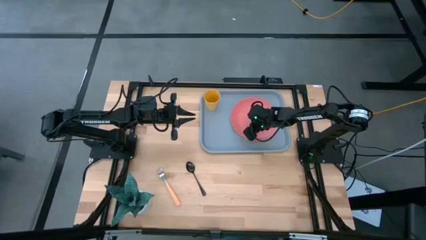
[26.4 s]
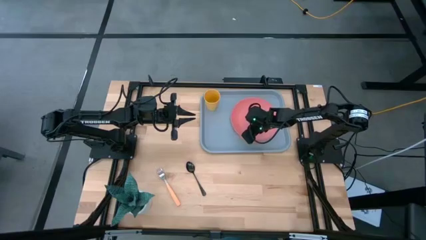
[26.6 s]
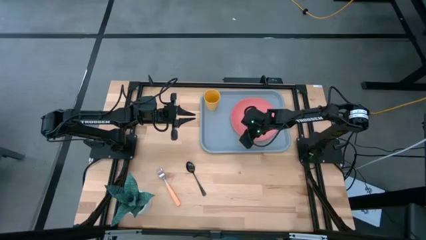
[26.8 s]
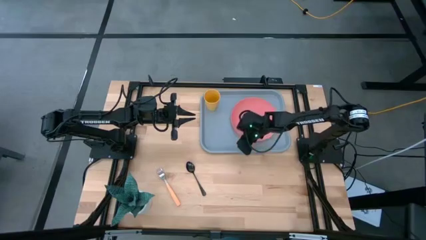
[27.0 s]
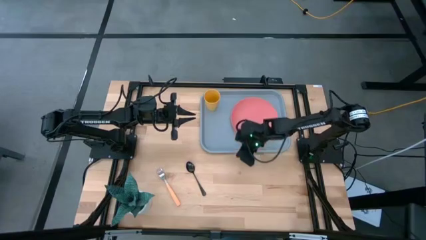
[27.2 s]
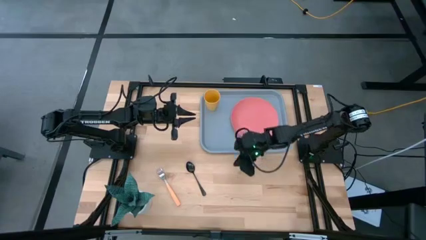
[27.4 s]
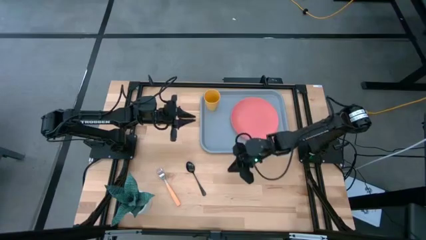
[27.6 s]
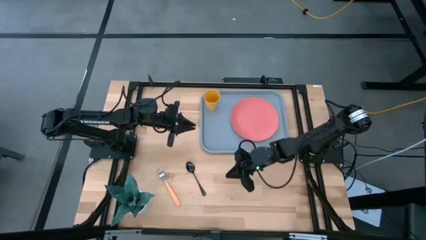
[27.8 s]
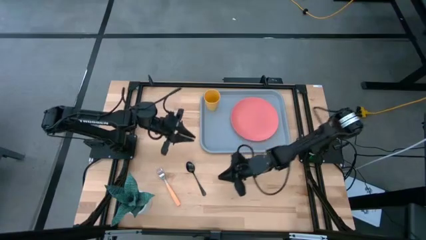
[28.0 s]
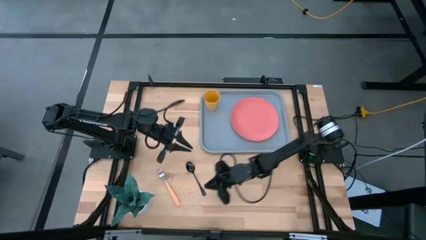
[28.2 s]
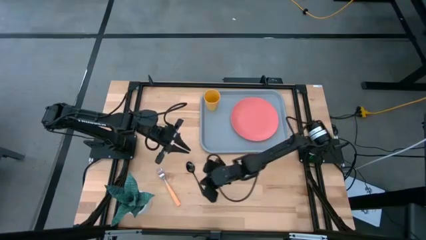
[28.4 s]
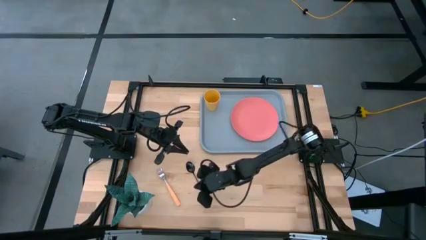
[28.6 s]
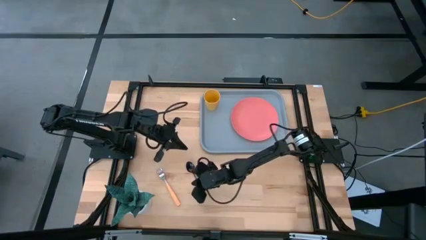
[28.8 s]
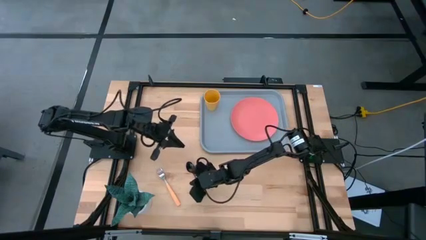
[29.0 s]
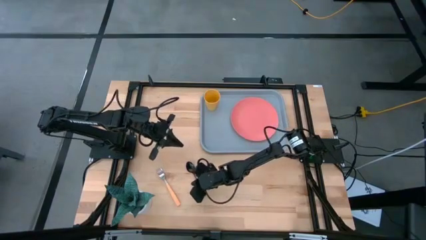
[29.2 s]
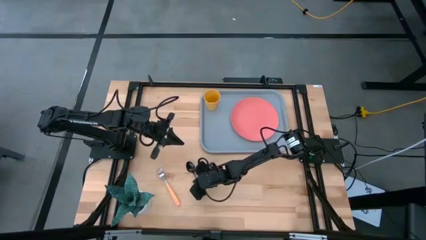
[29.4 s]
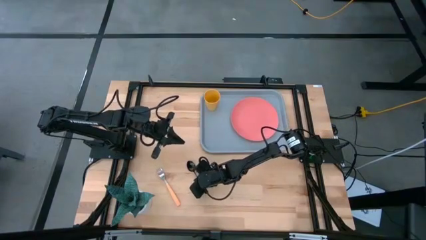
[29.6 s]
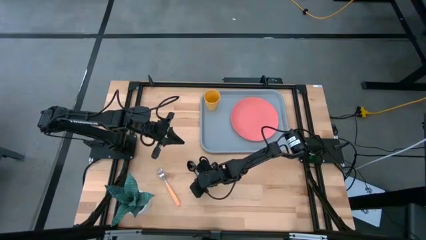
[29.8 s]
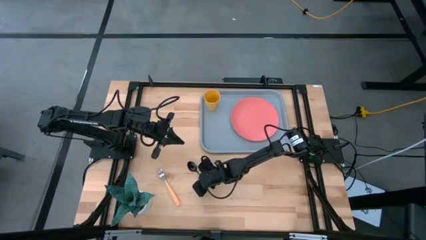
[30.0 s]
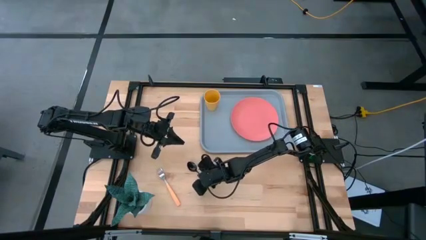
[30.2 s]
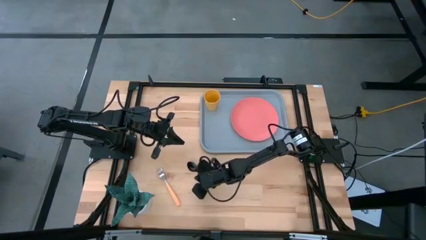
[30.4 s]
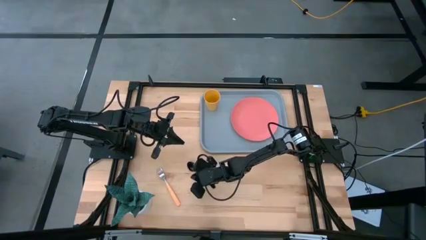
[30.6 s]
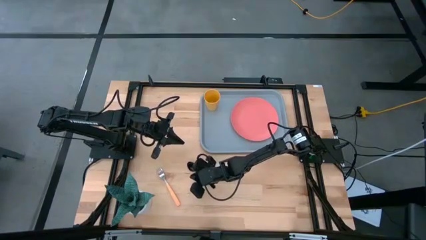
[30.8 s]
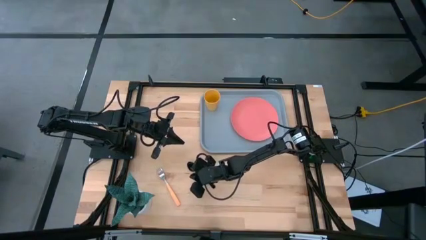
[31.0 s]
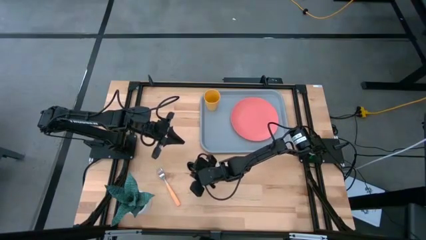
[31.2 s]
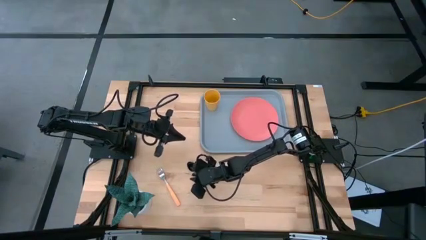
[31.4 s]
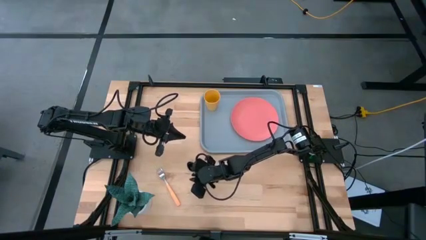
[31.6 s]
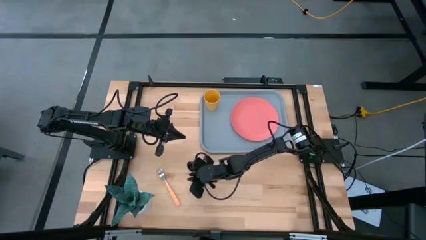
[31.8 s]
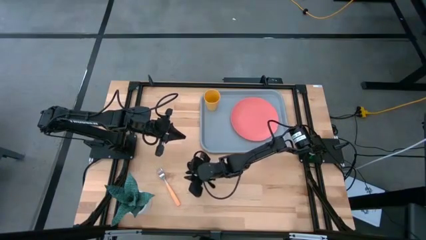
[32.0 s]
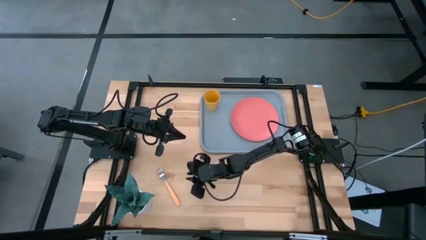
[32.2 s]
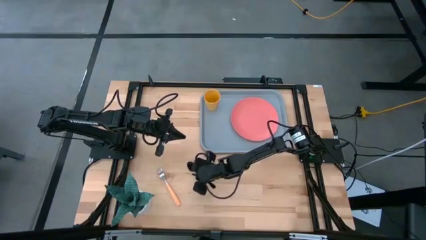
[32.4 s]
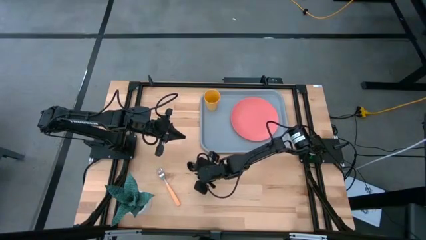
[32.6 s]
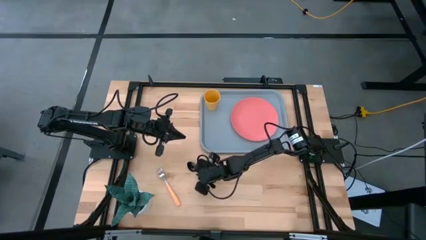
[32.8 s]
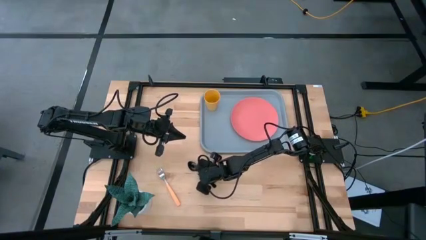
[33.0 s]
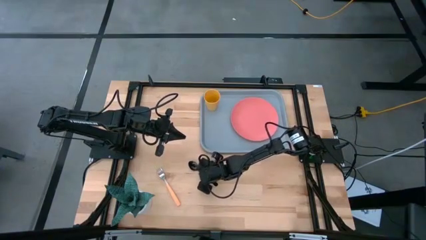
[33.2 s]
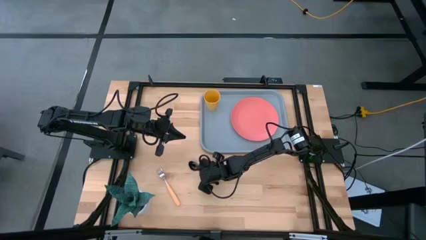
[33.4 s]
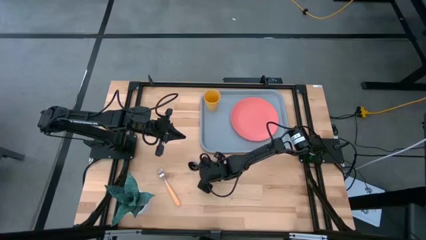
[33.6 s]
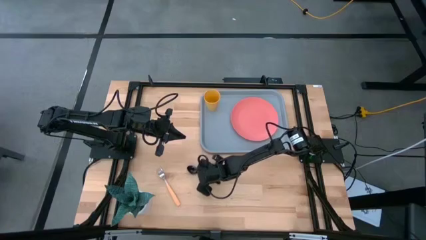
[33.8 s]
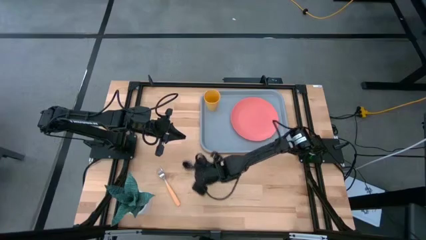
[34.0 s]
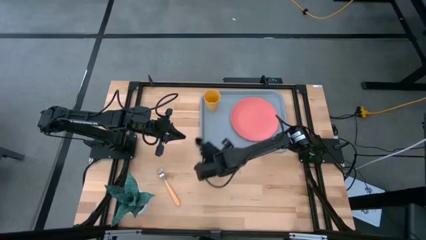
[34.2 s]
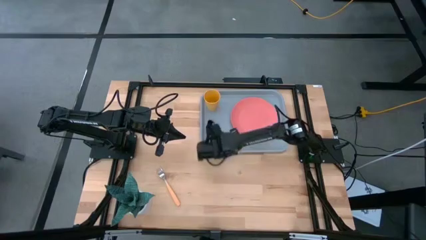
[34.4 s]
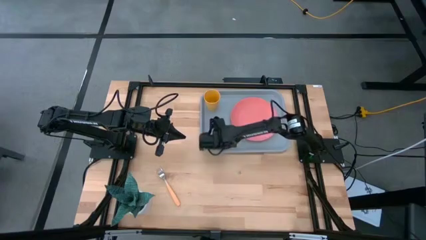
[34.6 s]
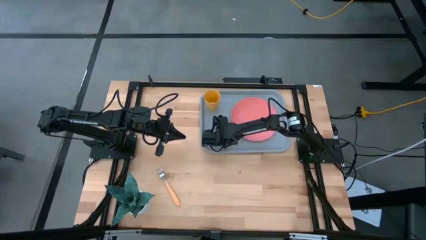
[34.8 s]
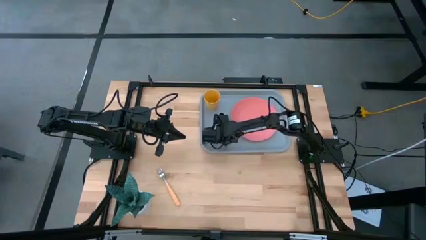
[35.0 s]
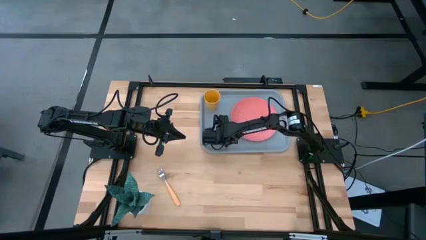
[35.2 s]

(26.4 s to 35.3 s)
Task: Pick and place plate/cup/fork/spoon on tray
Put the black spoon on the gray tray to the left of the pink plate

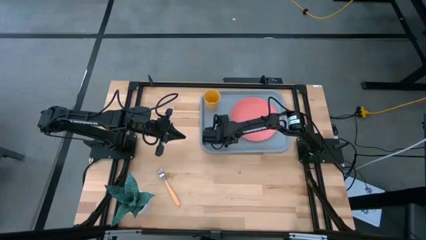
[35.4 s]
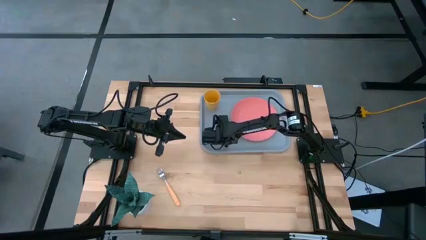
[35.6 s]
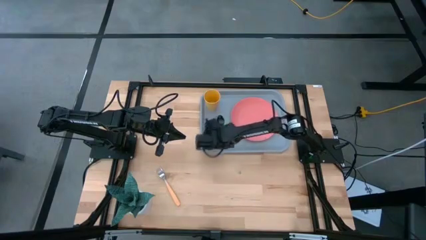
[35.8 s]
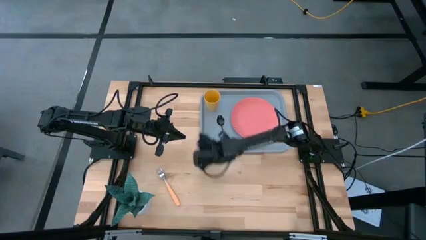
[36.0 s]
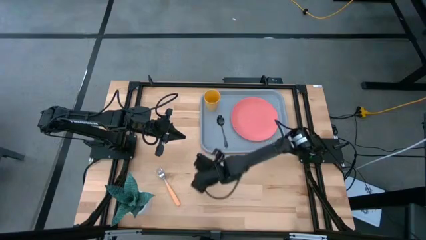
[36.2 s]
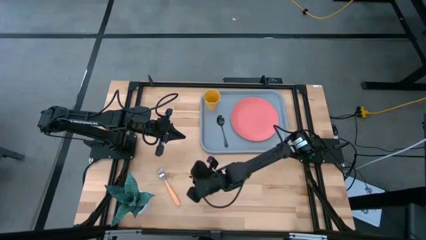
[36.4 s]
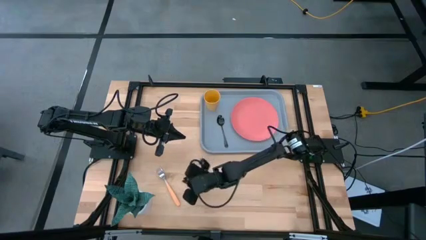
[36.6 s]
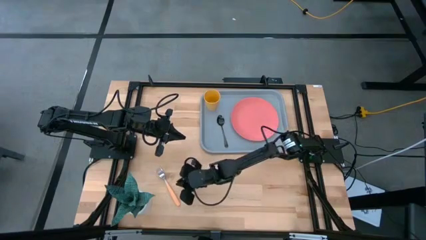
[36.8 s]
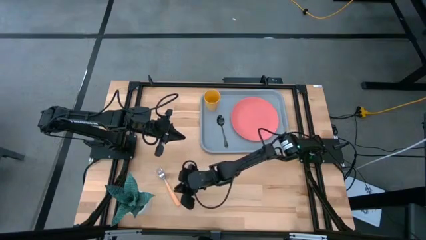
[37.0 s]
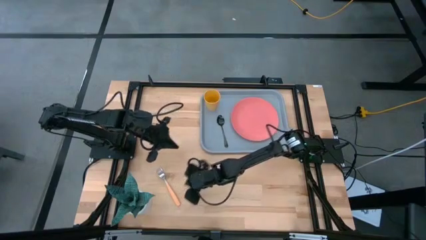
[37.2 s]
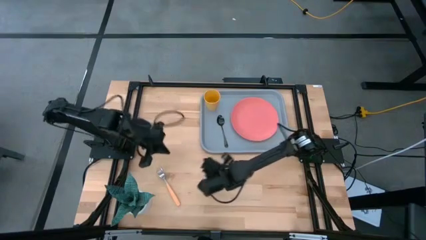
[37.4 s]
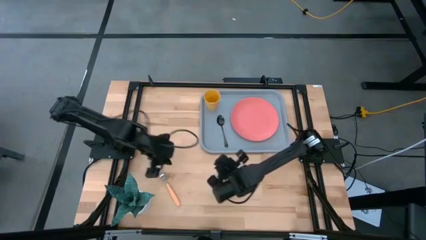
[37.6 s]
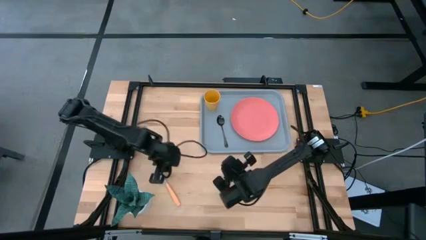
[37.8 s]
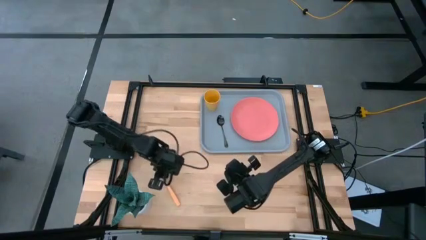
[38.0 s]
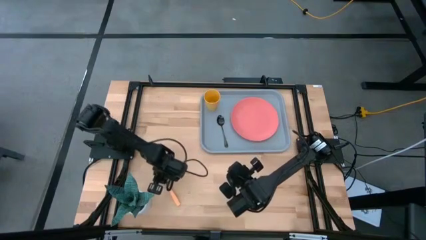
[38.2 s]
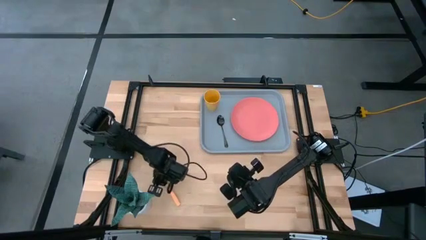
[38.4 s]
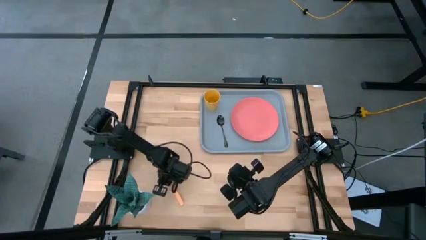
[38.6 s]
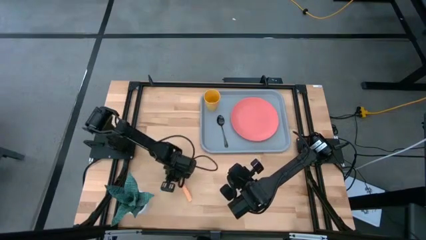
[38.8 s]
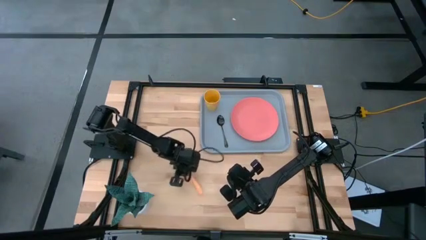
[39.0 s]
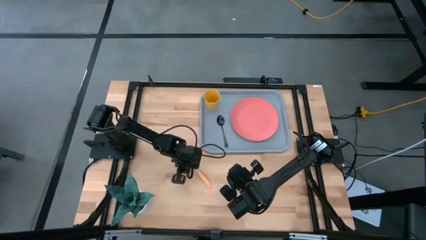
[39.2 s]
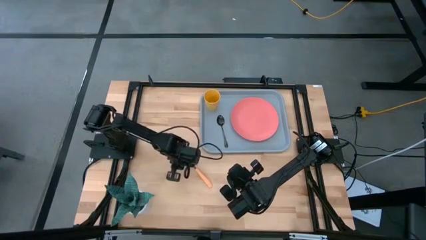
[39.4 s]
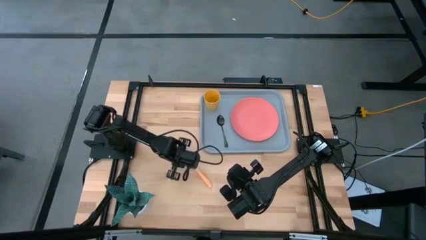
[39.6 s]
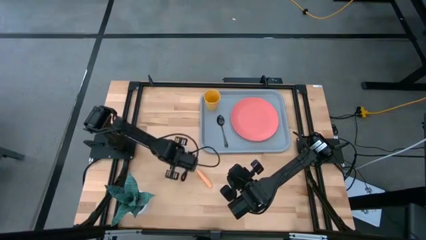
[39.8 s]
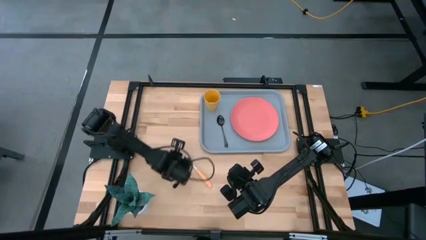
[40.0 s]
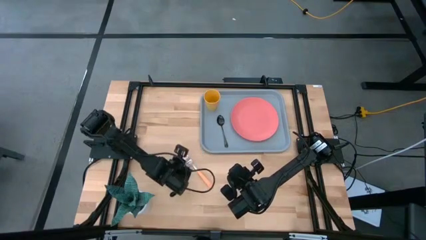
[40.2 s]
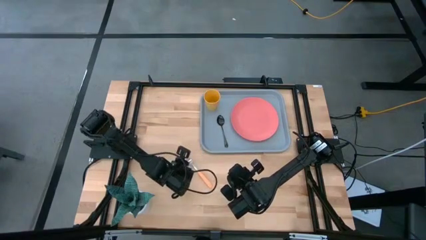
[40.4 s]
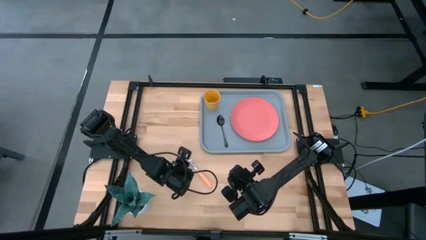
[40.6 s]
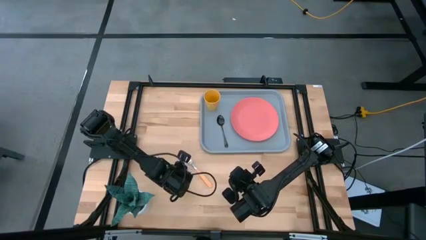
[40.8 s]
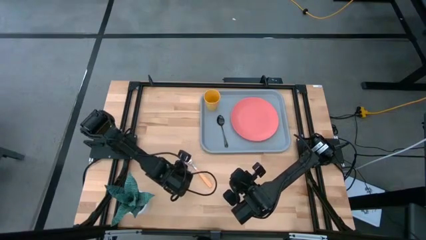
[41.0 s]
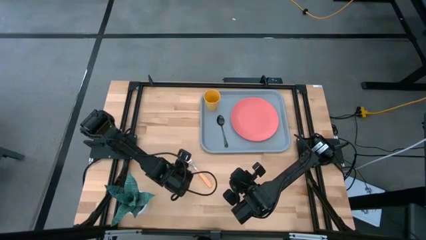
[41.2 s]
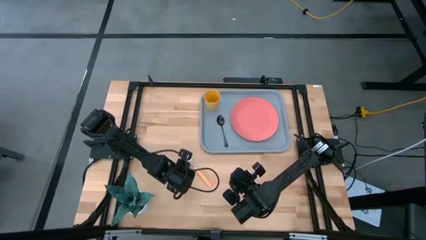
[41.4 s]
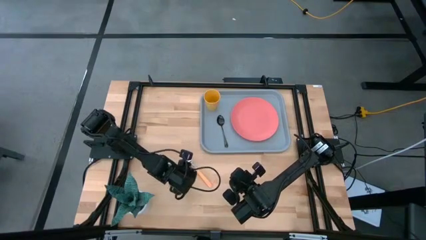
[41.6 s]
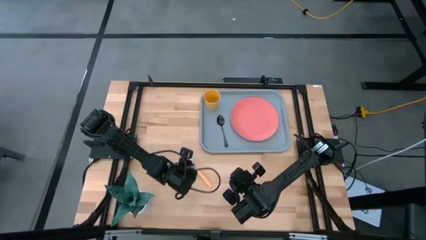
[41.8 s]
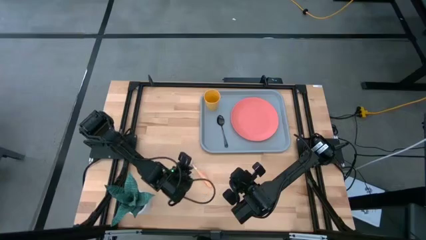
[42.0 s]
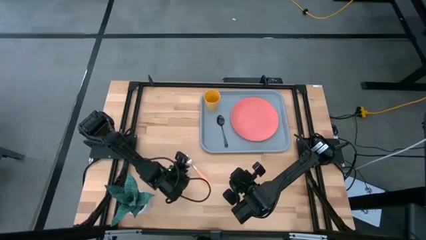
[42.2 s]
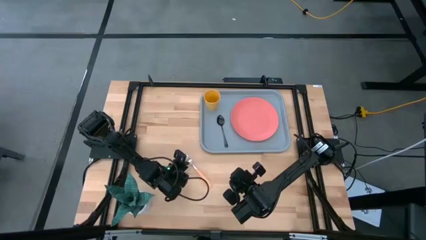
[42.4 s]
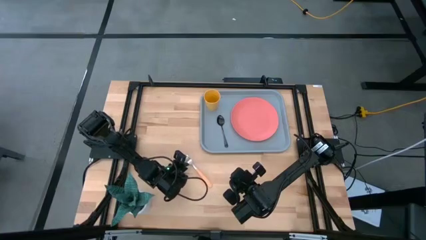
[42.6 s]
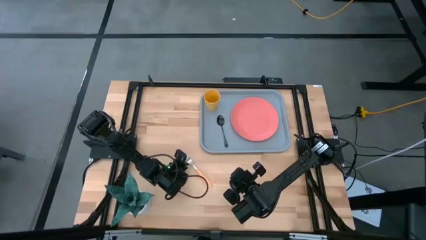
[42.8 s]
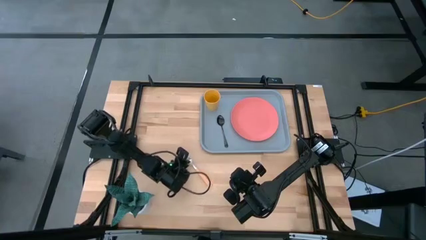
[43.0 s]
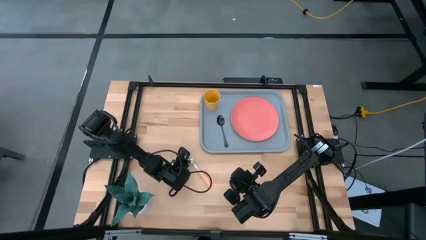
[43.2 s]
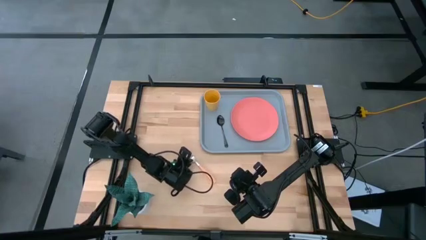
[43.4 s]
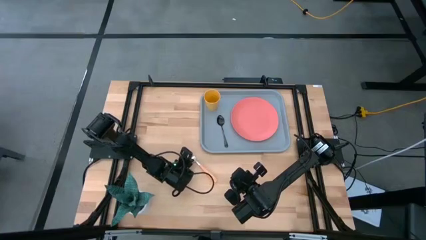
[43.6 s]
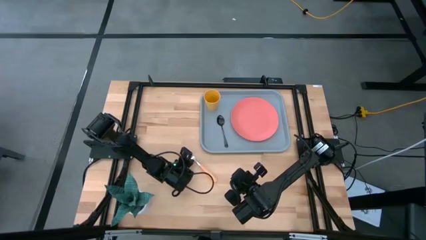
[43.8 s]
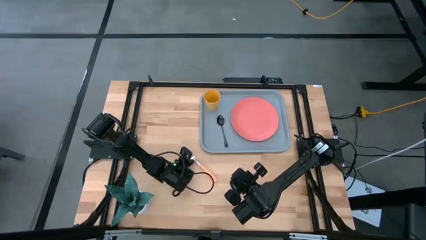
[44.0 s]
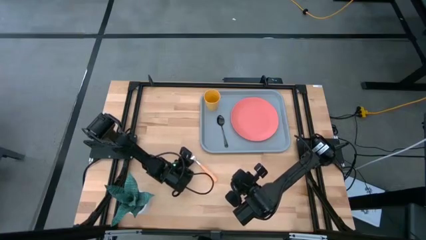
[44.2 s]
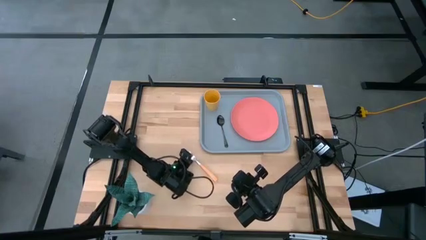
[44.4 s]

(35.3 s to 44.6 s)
Put the orange fork on the gray tray to the left of the black spoon
